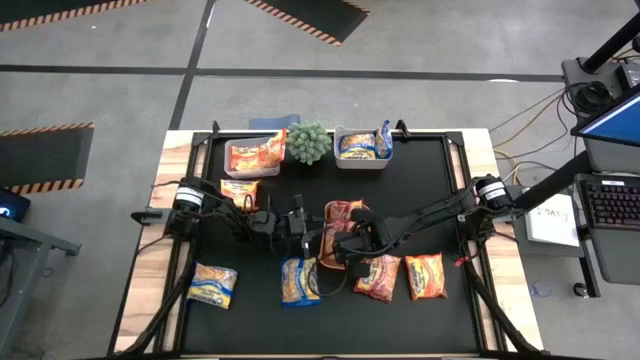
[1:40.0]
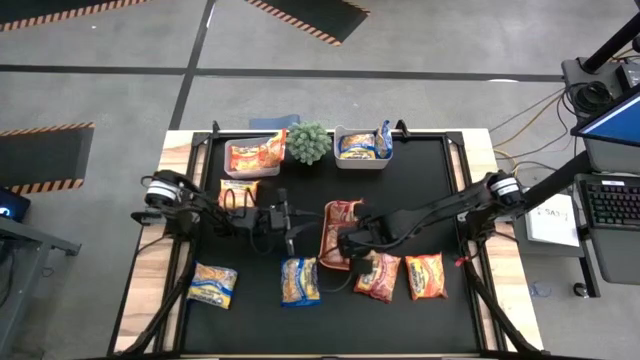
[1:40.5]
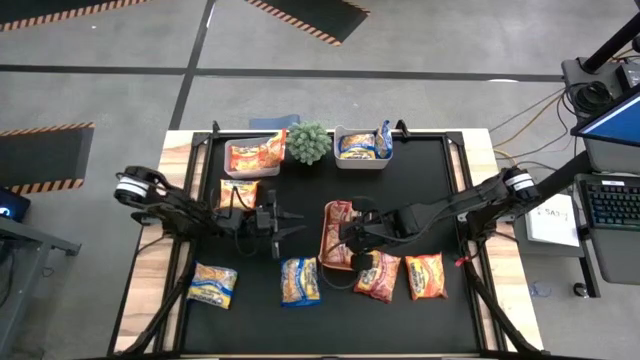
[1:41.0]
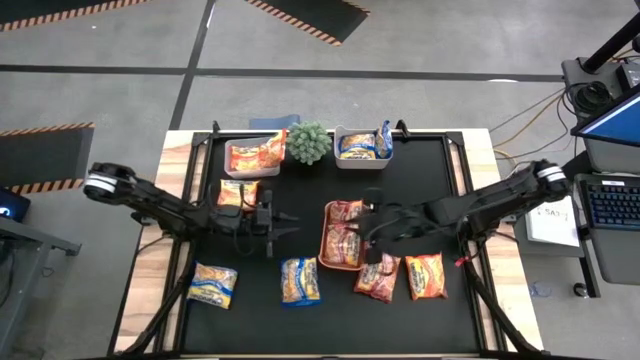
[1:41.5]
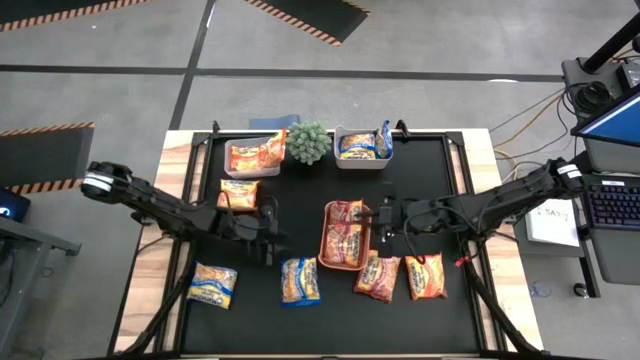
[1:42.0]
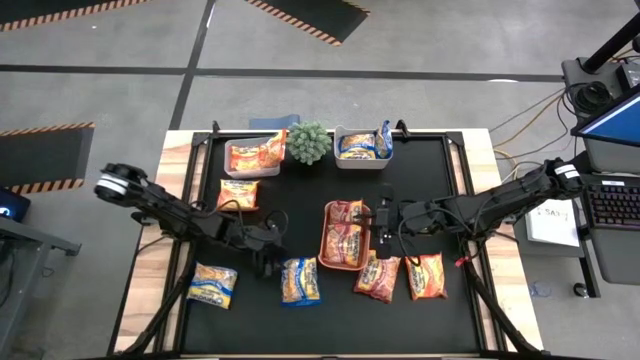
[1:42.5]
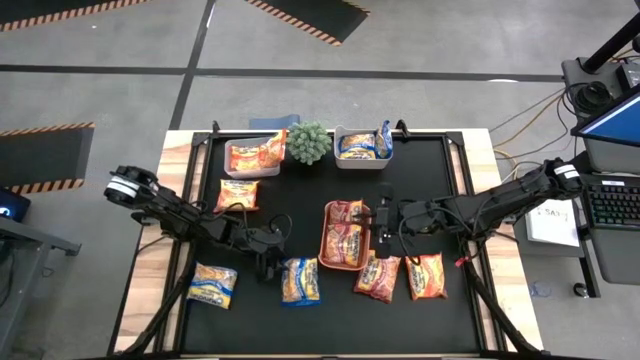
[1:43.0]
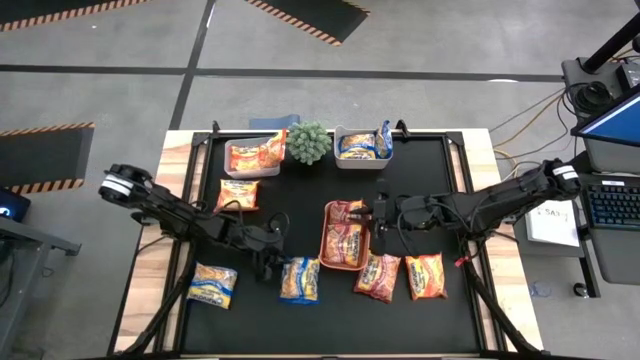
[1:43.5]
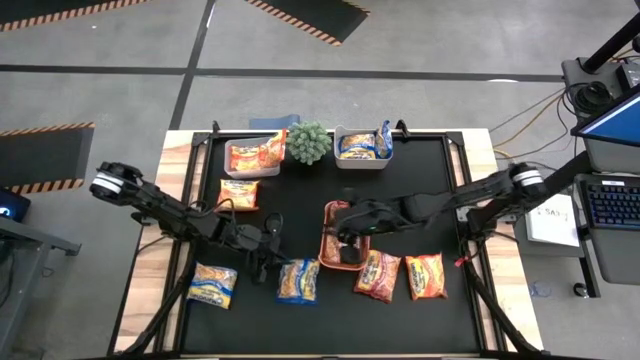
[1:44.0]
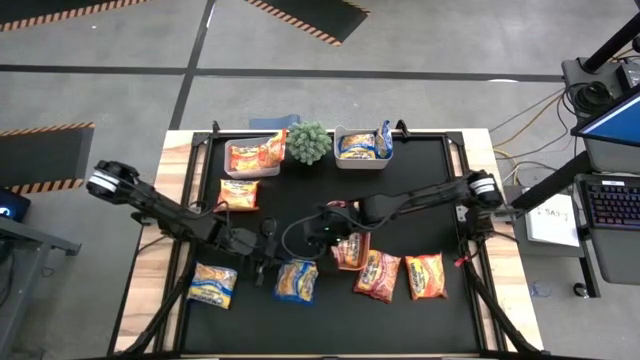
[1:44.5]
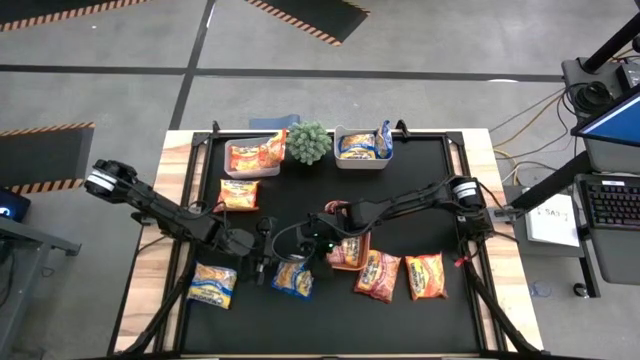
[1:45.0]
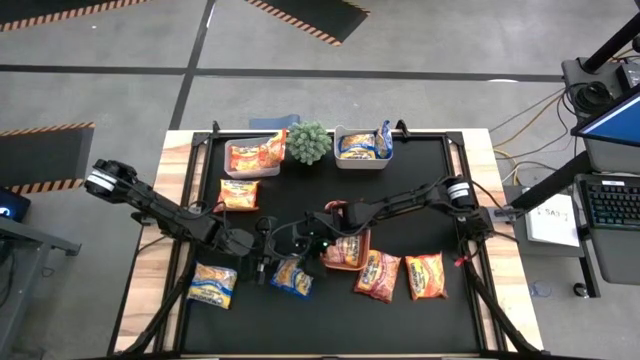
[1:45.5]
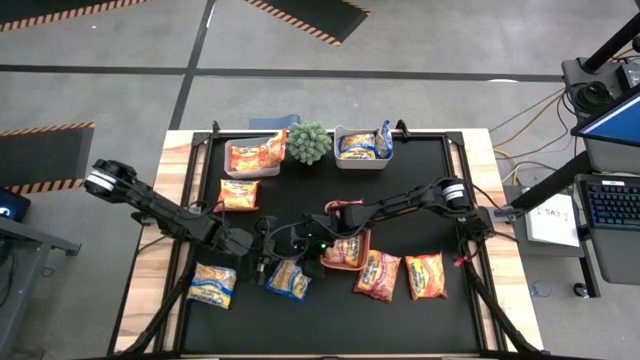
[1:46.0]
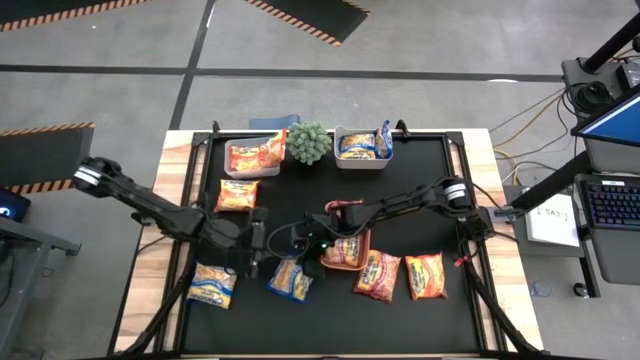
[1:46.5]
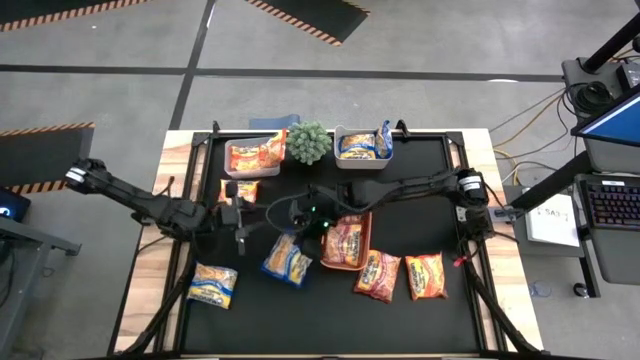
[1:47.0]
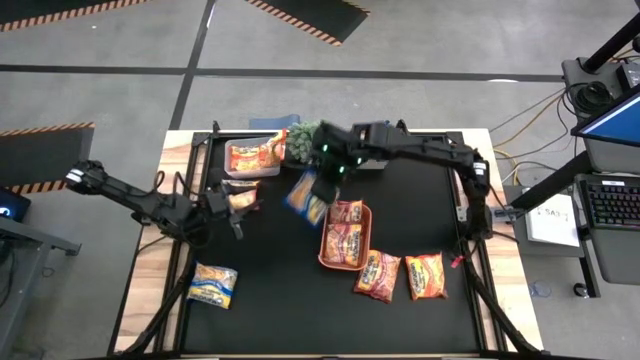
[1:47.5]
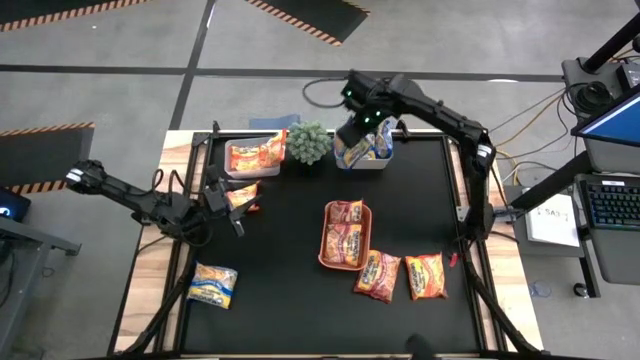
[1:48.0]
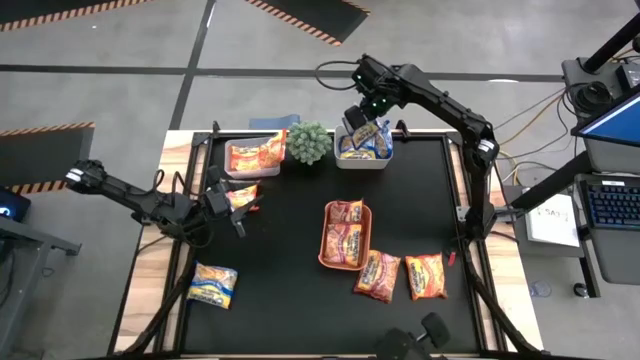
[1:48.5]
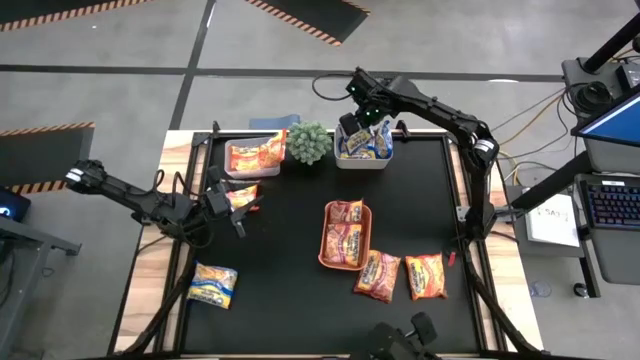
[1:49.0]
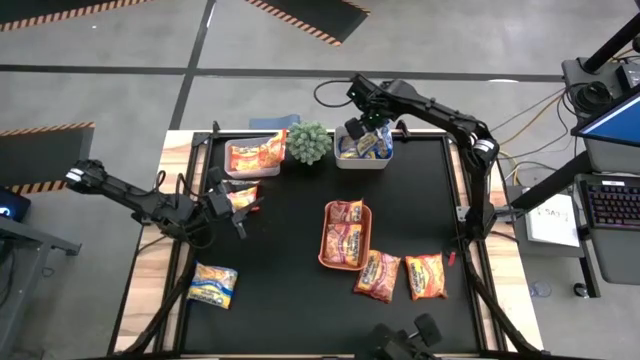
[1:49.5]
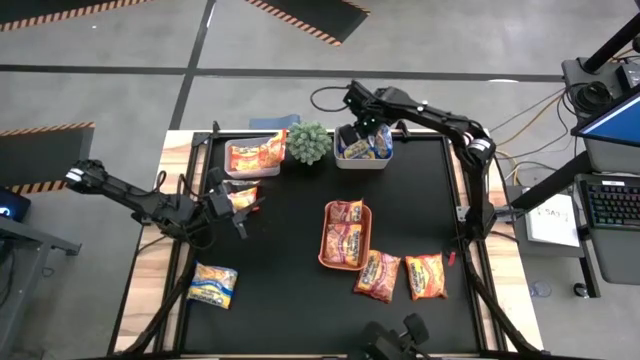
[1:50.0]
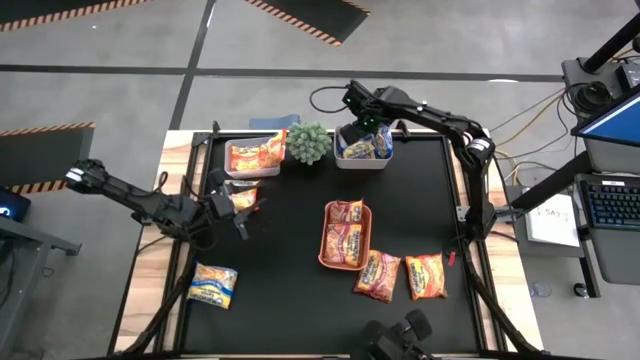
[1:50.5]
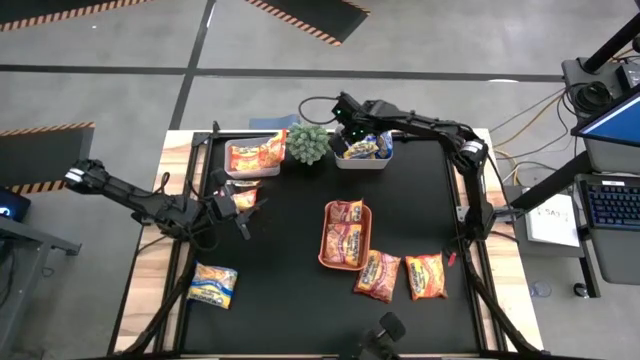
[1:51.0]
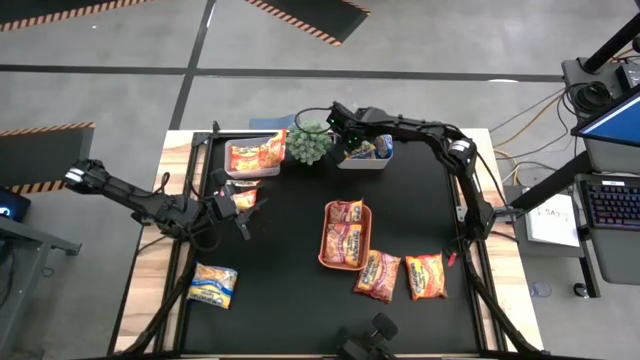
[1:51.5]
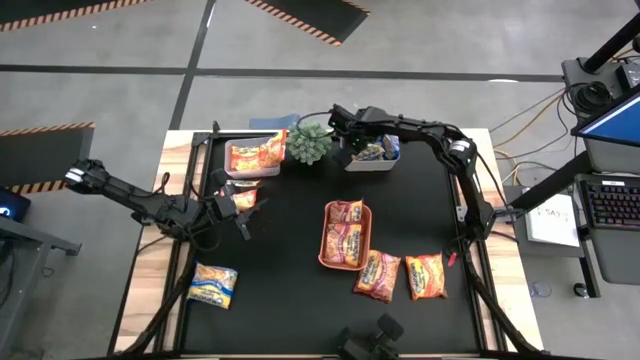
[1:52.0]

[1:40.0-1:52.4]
Task: Sort Maruchan noodles
Put the blue noodle pack into the gray bin

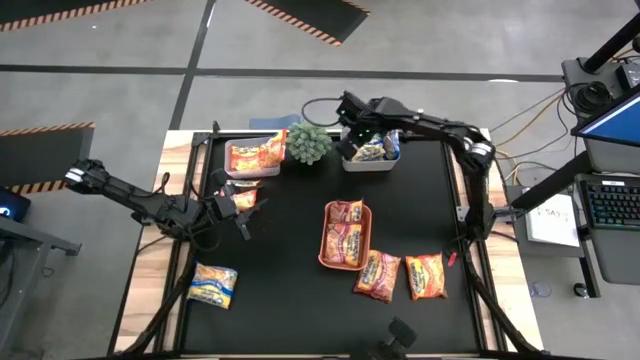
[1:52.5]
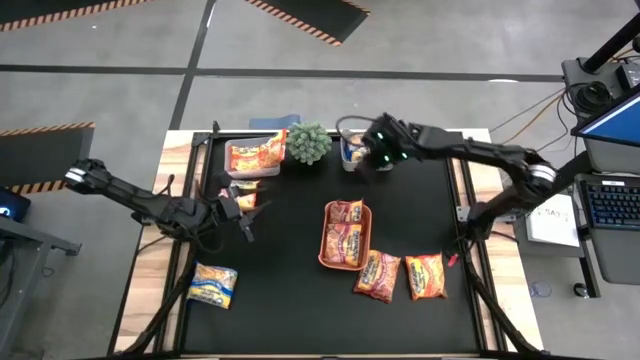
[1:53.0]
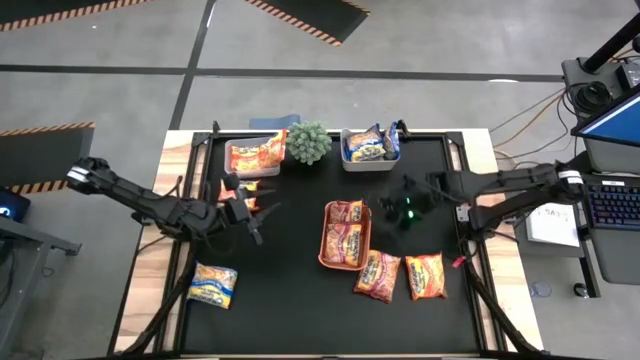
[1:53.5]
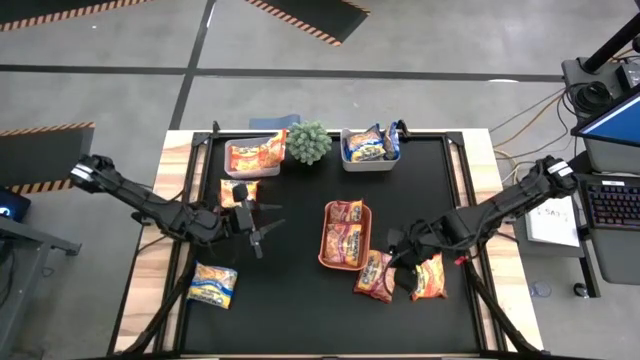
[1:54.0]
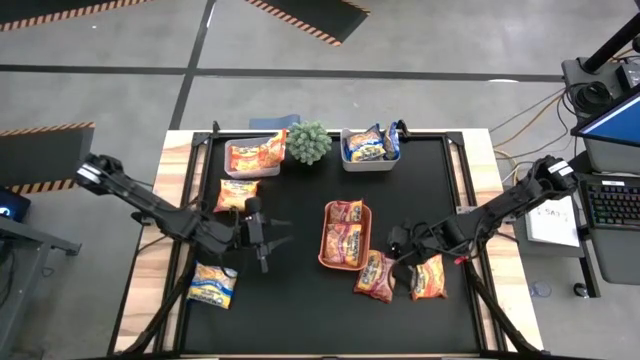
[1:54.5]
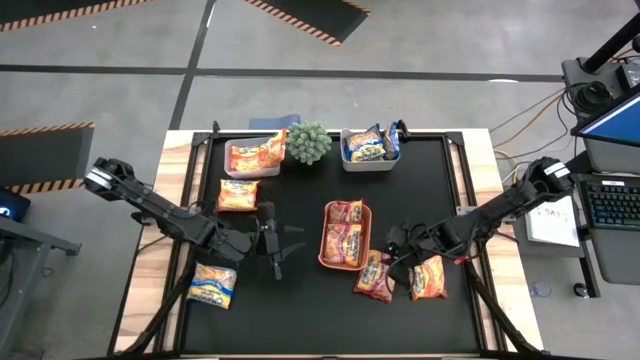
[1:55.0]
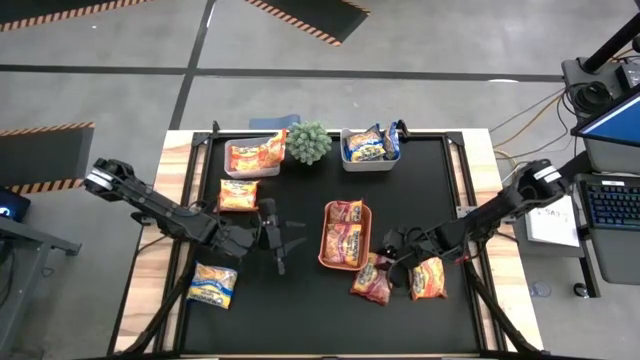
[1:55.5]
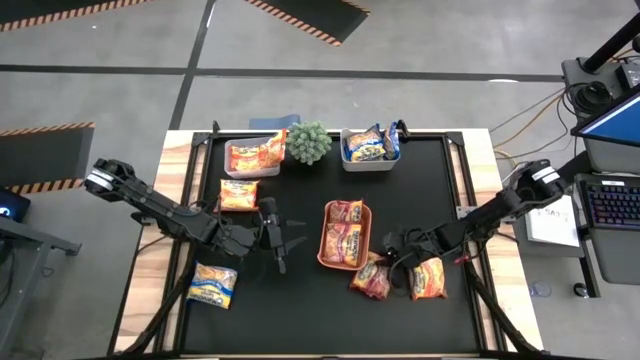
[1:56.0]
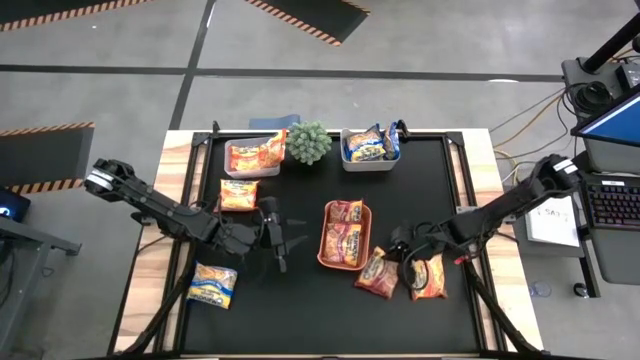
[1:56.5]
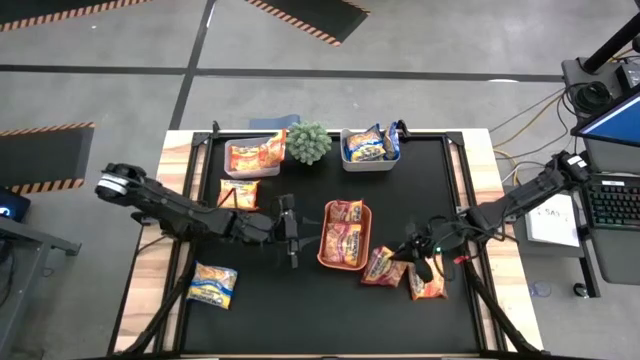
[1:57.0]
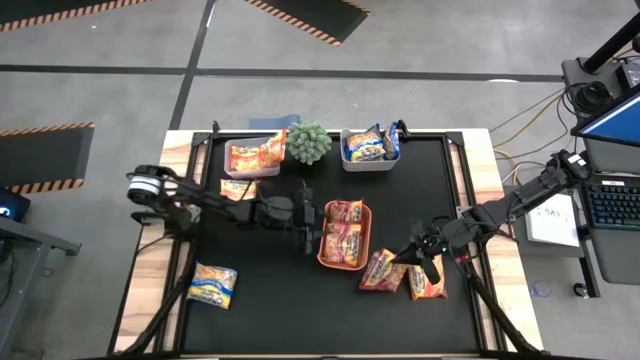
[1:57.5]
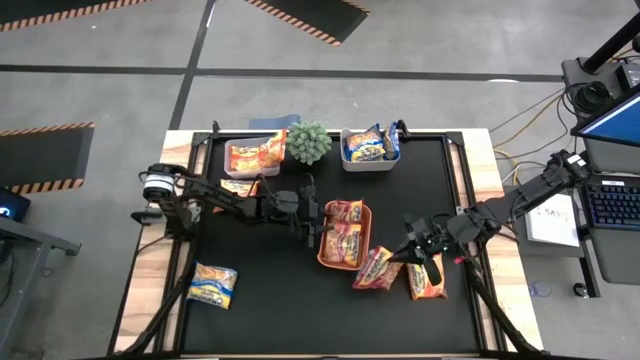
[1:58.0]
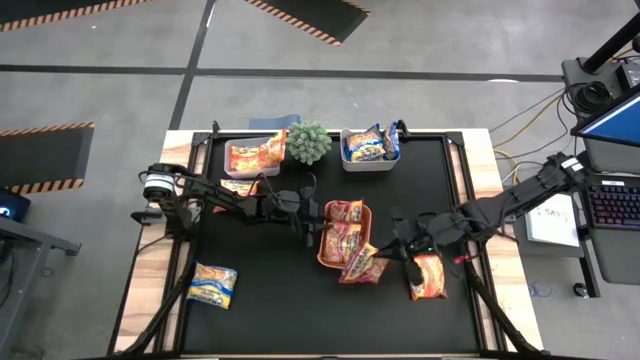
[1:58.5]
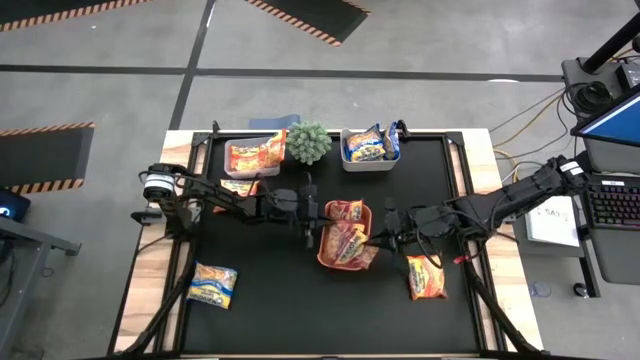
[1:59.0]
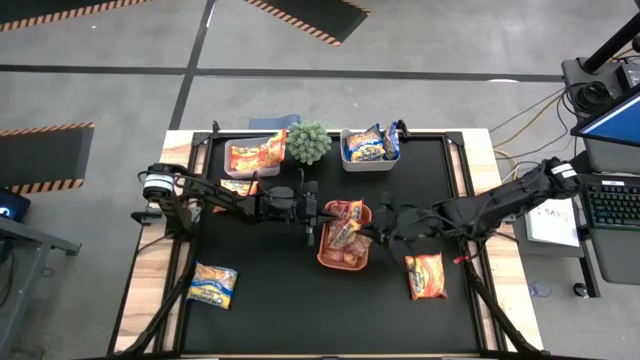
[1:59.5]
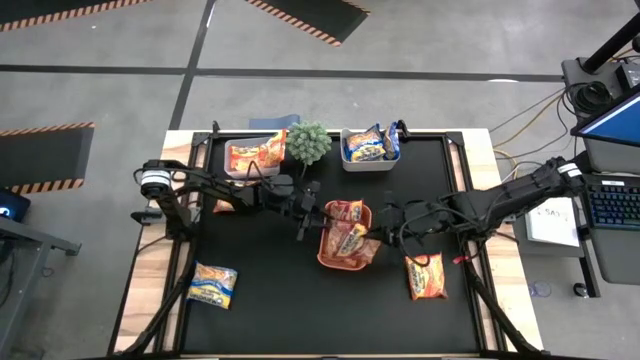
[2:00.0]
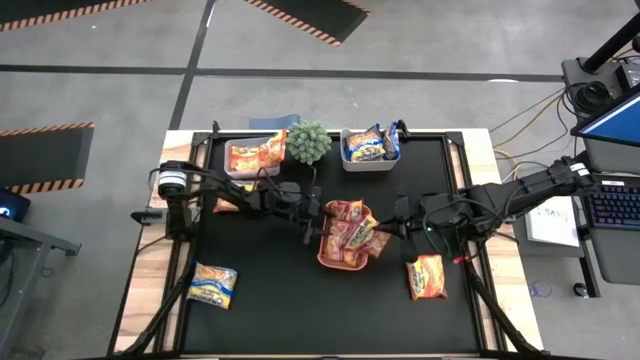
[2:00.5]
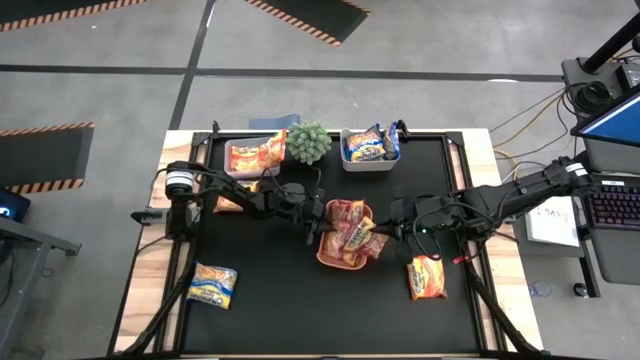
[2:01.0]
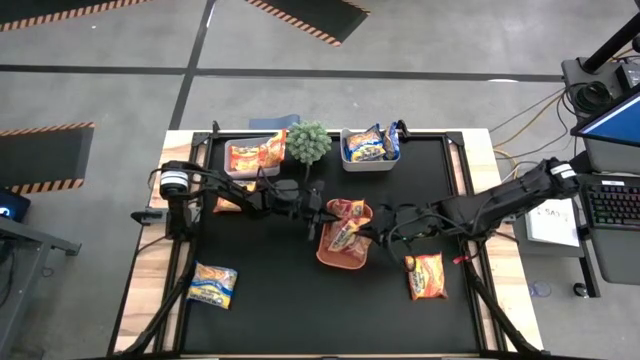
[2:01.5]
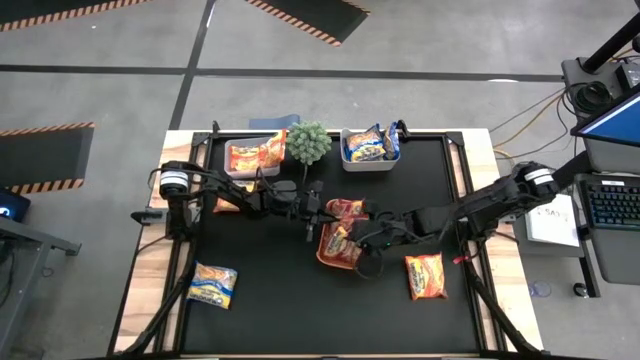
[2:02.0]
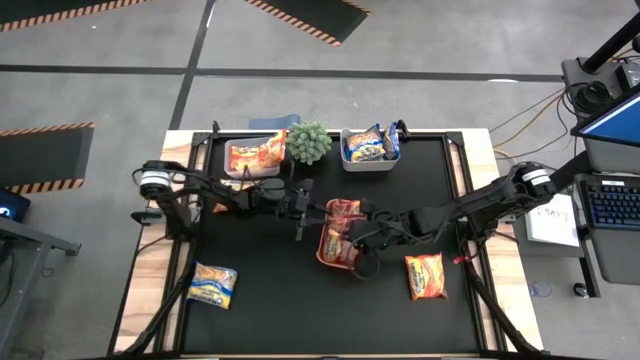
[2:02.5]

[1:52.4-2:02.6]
Put the red noodle pack into the orange bin
